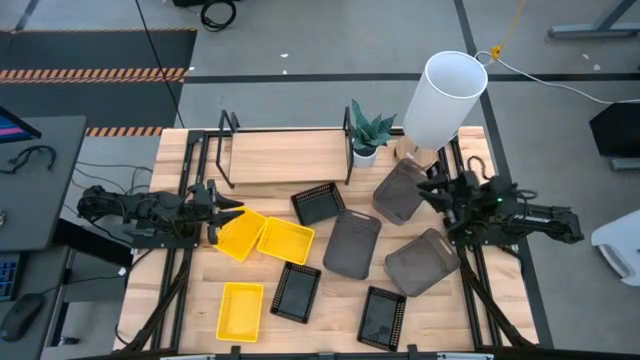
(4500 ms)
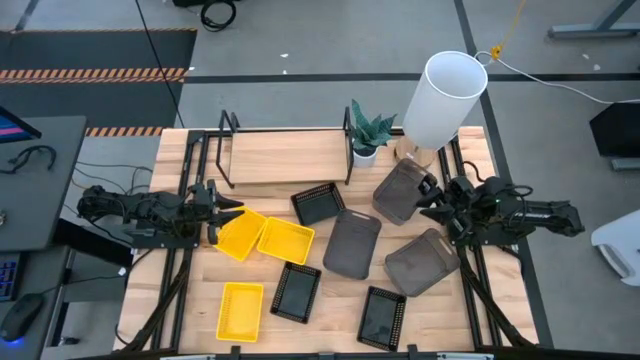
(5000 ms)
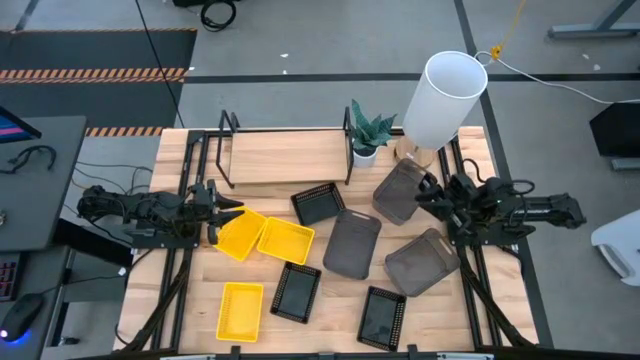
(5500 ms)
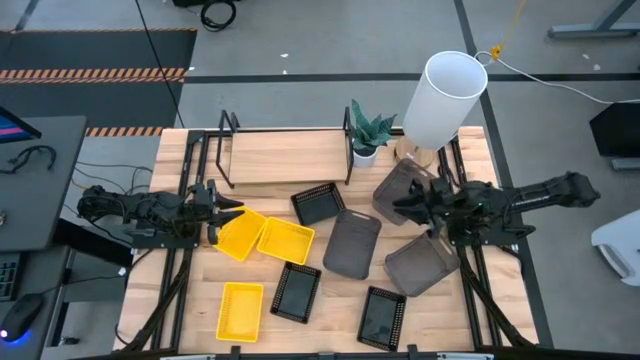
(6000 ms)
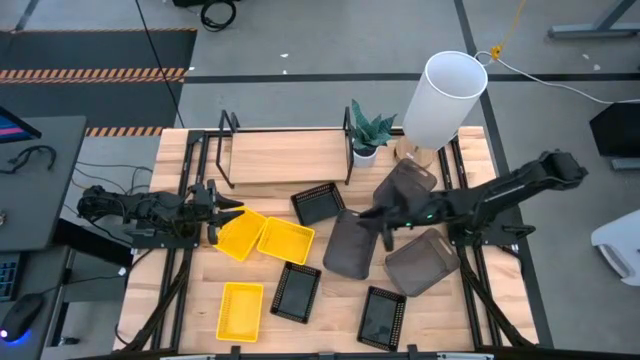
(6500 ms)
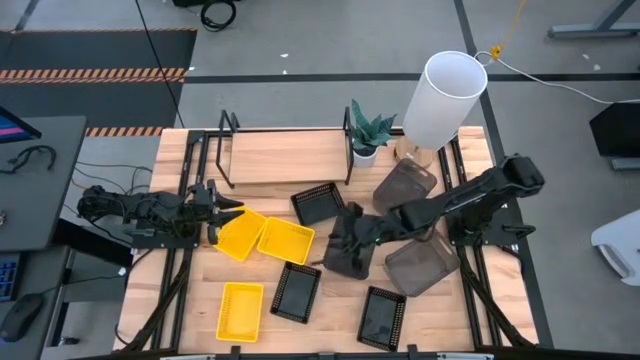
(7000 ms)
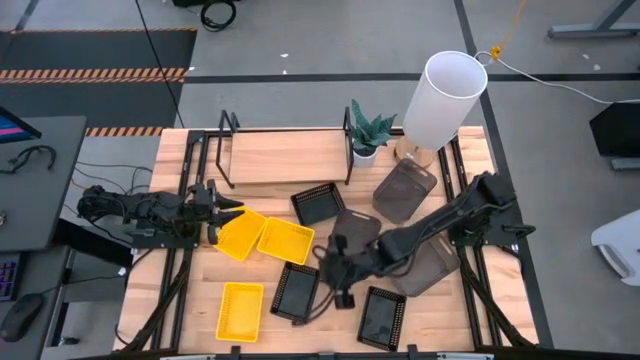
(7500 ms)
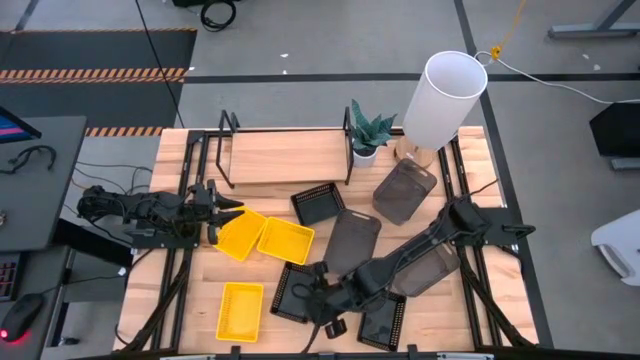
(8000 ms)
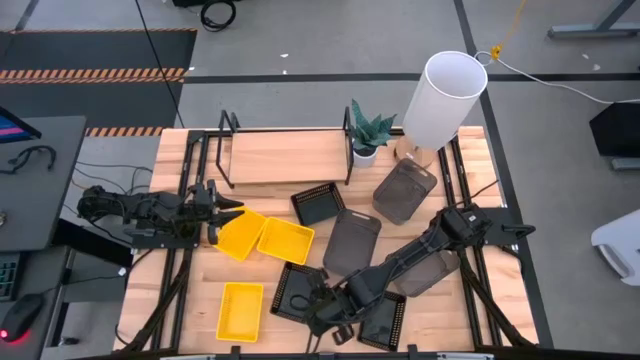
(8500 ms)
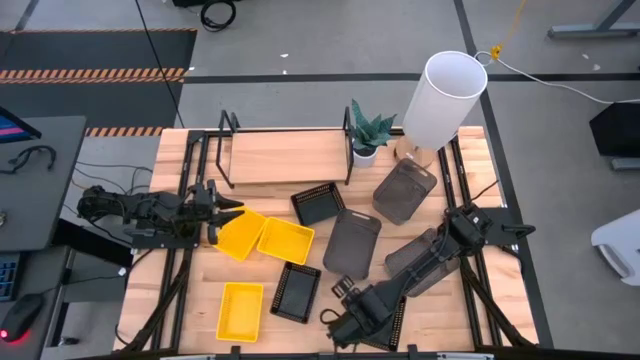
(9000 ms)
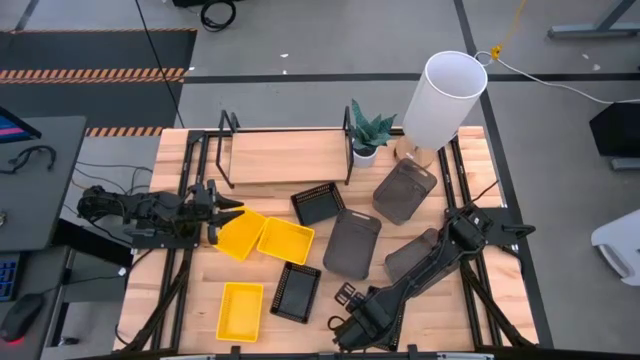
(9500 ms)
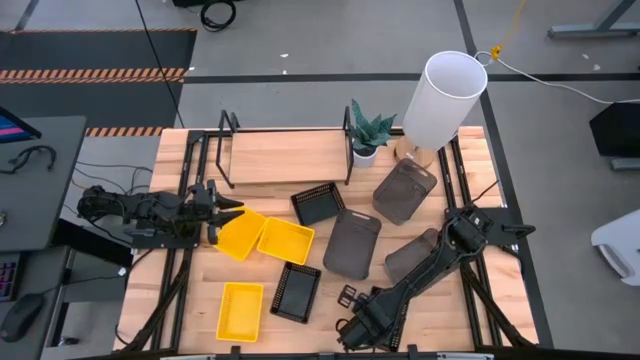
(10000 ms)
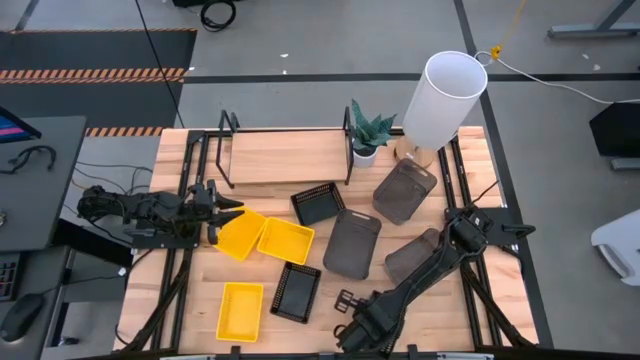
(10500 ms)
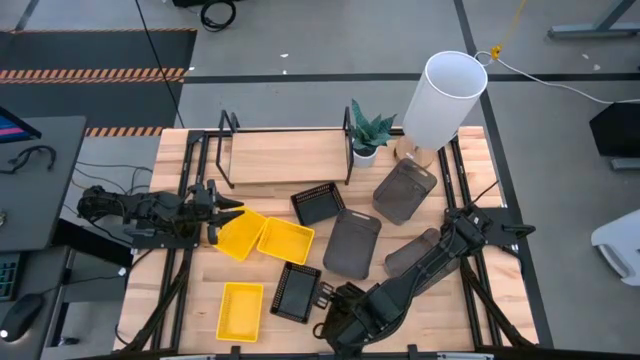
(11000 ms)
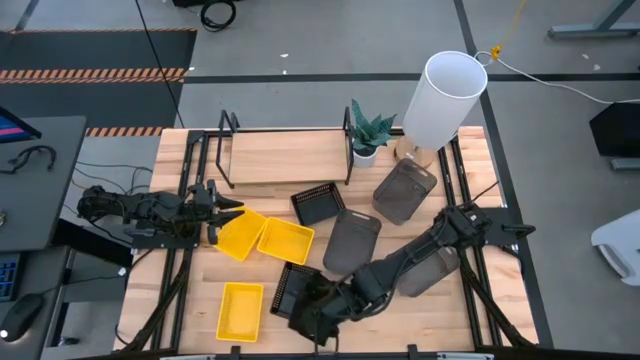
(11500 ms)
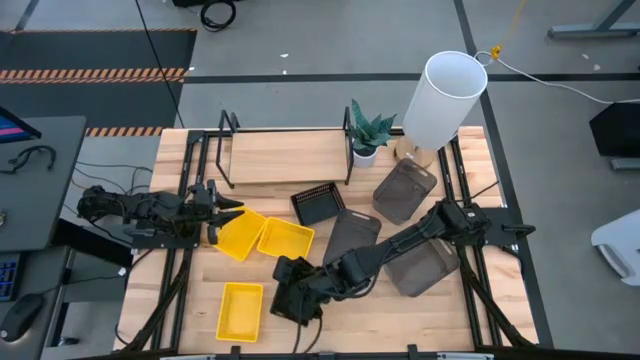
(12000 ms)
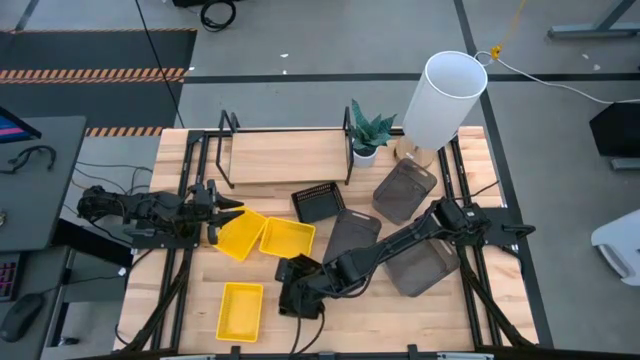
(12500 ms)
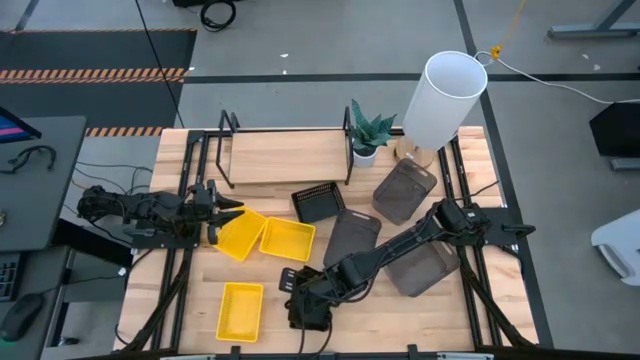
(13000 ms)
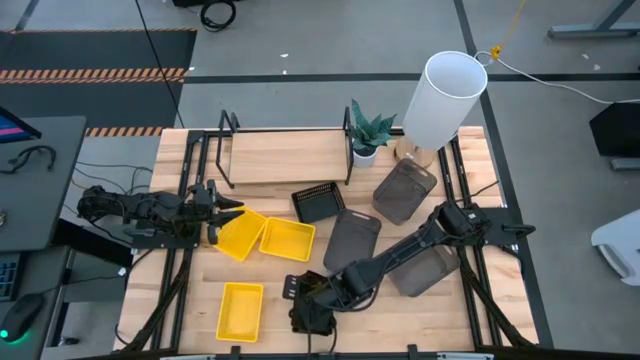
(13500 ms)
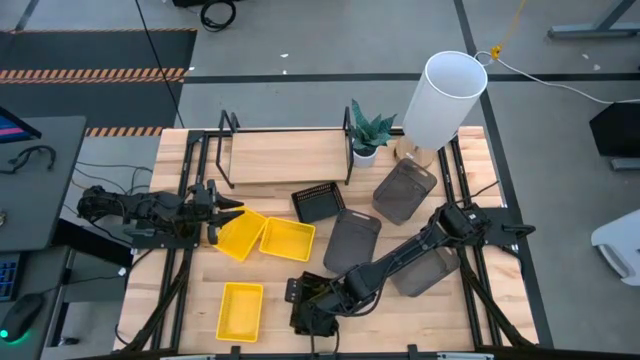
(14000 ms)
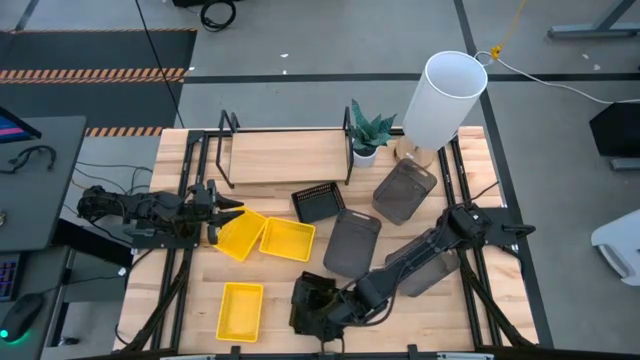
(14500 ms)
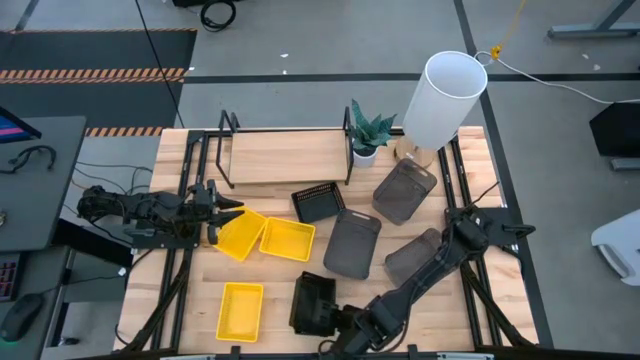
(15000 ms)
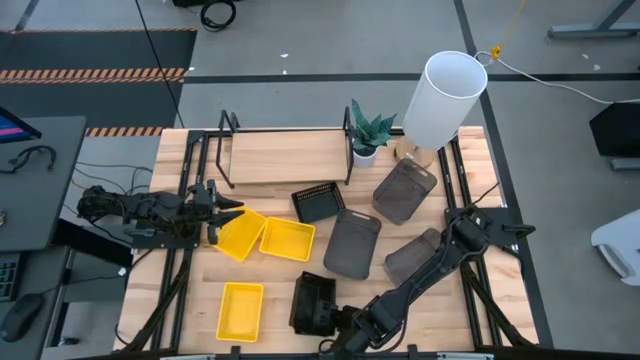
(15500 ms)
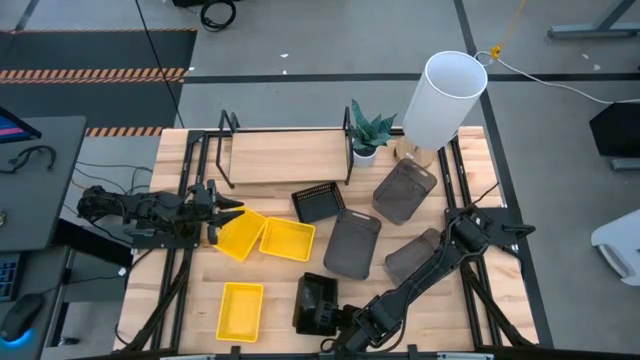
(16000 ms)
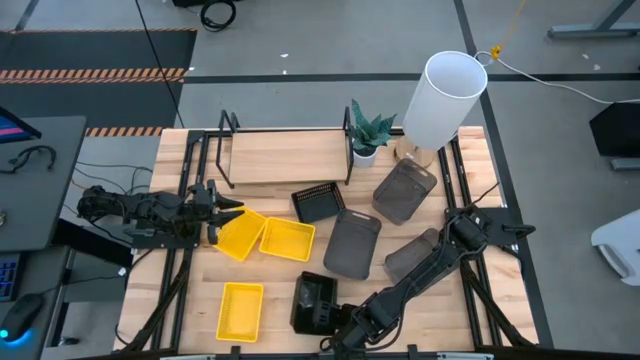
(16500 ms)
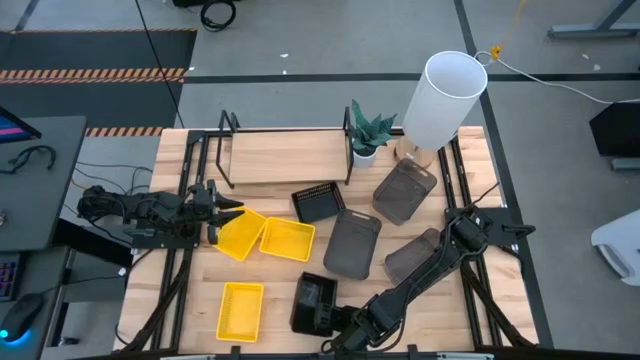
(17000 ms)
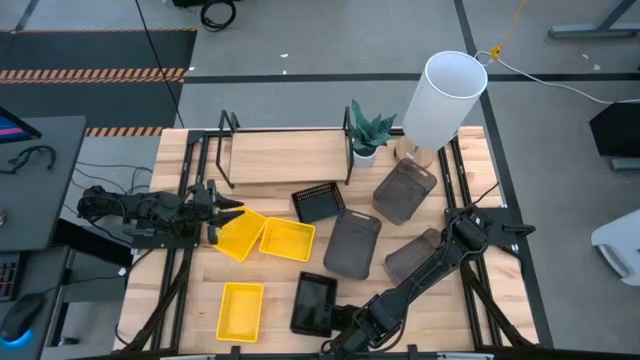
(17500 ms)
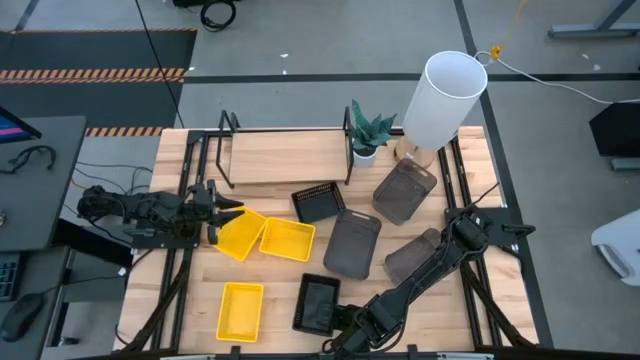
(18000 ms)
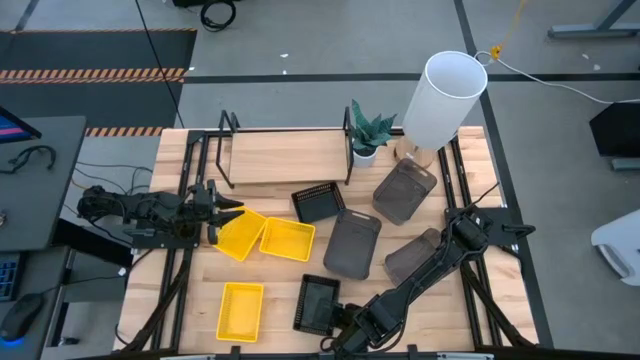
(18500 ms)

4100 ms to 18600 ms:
Task: Stack baskets on shelf by color
Stack the bottom black bin on the middle small black bin

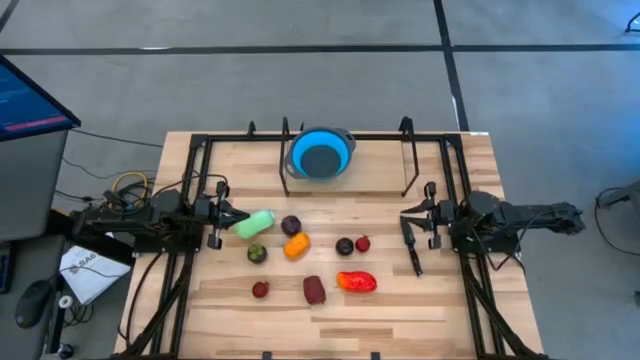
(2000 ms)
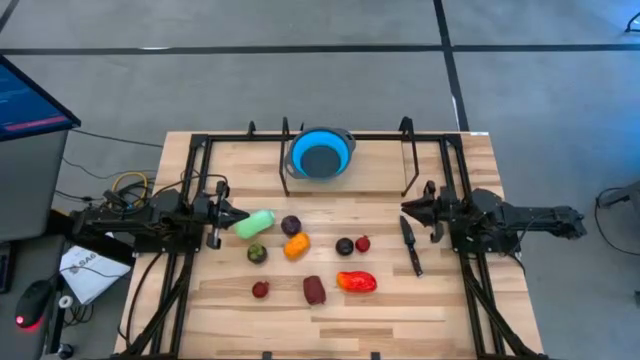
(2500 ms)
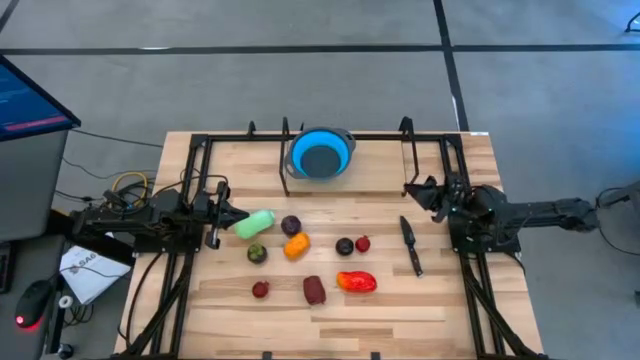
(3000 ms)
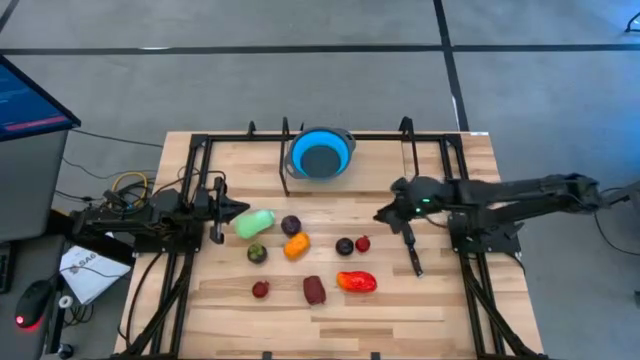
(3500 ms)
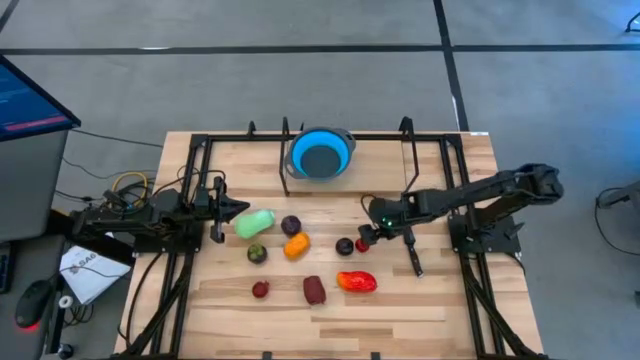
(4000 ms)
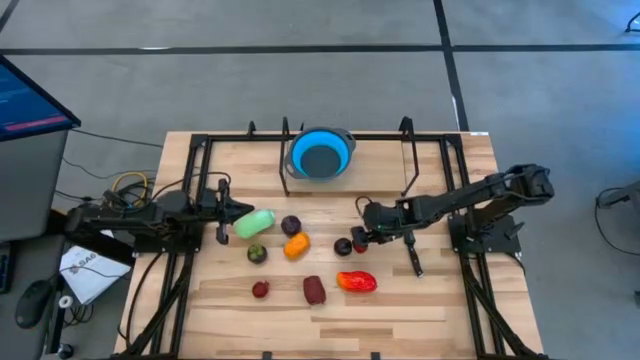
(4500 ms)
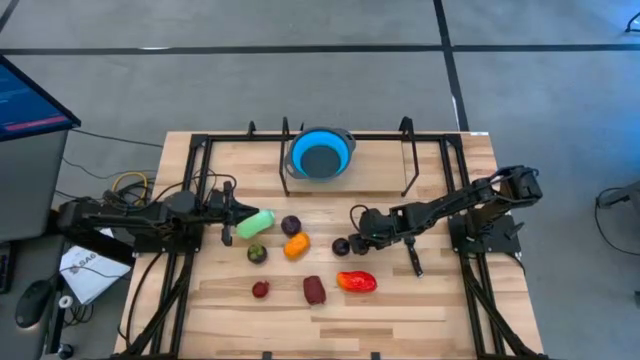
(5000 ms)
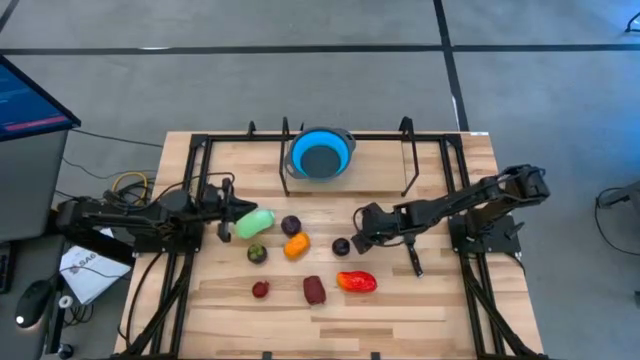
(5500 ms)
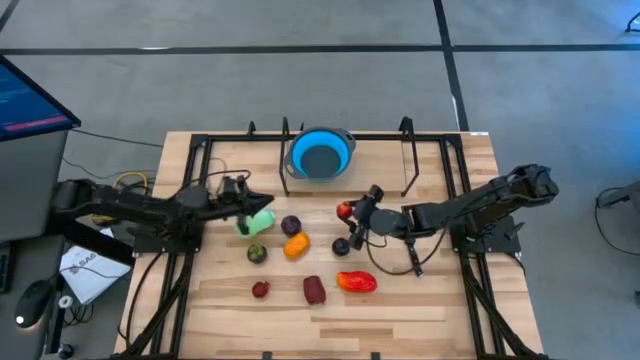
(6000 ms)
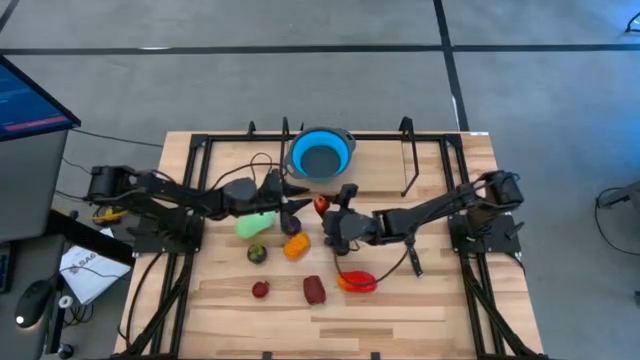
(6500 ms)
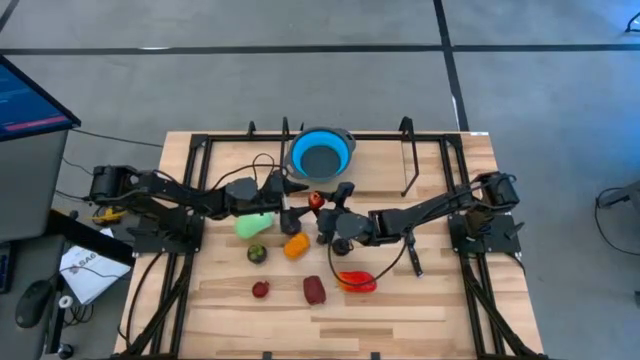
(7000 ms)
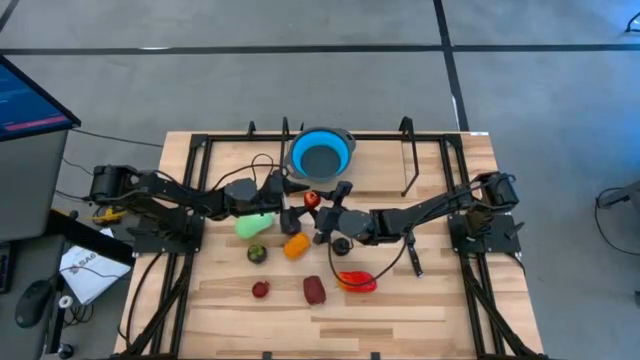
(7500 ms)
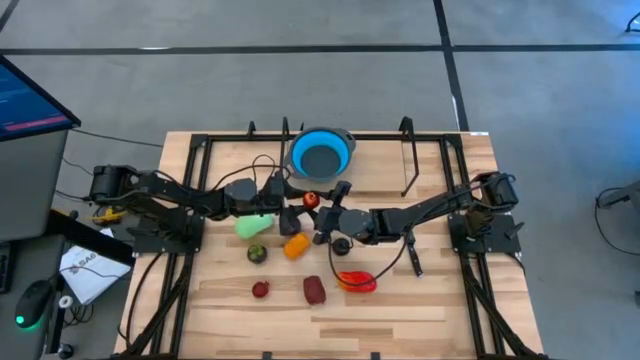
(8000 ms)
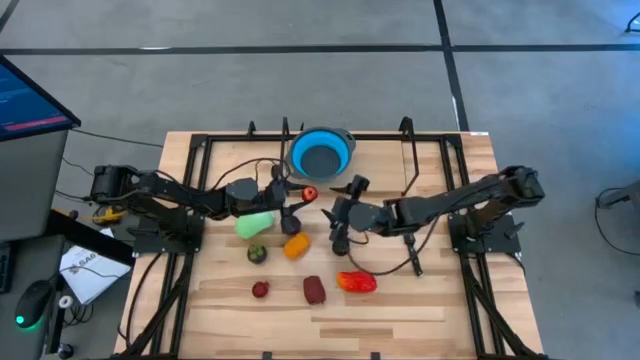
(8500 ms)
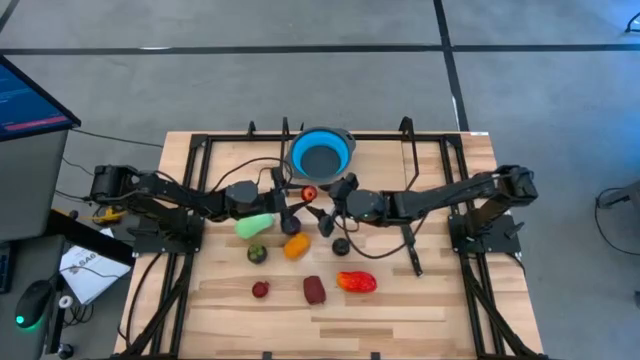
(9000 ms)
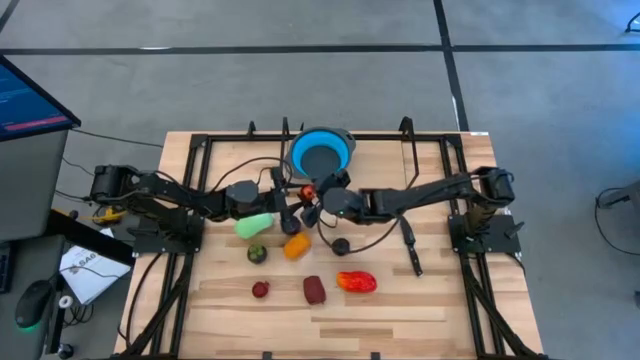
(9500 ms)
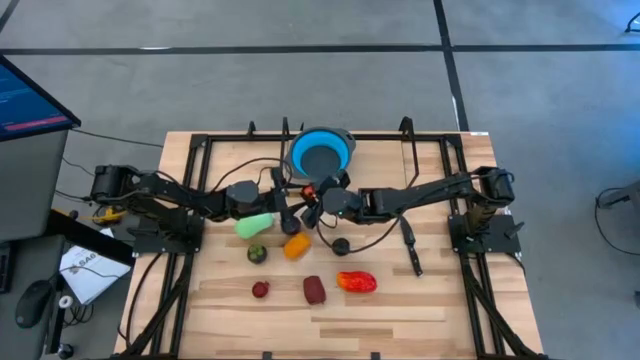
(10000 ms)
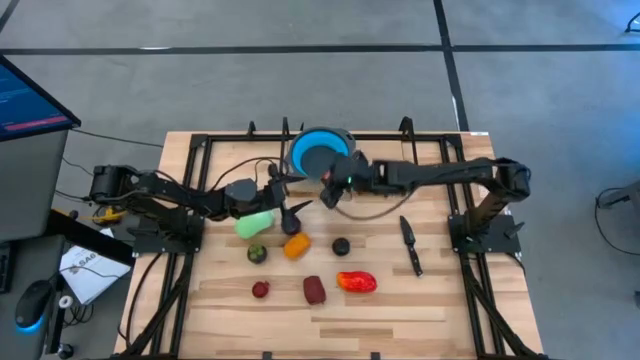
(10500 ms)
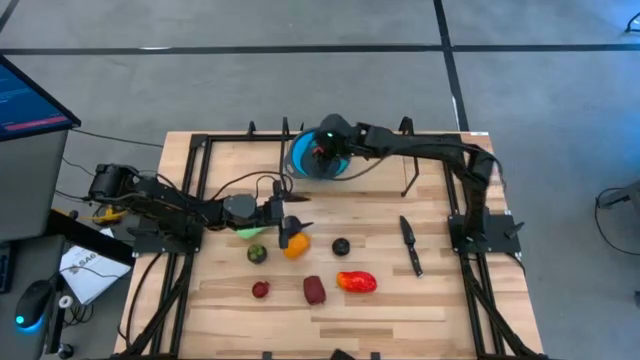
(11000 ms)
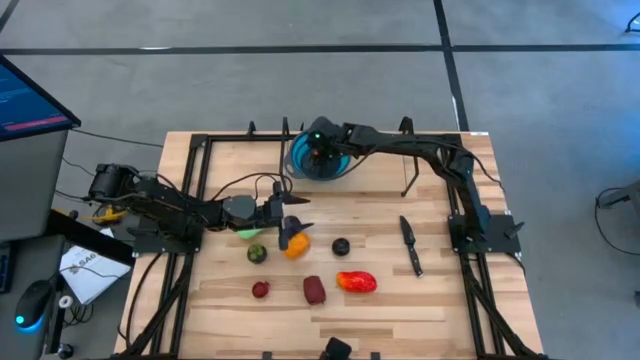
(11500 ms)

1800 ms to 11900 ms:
Task: Pick & Place Fruit
Put the top red pomegranate into the blue strainer bowl on the shelf
